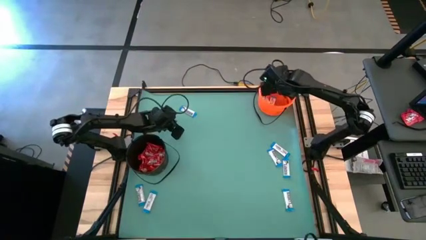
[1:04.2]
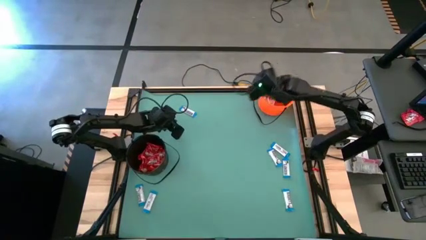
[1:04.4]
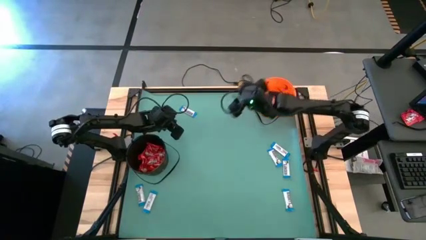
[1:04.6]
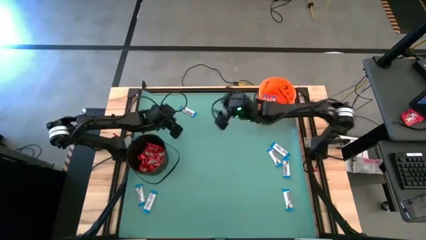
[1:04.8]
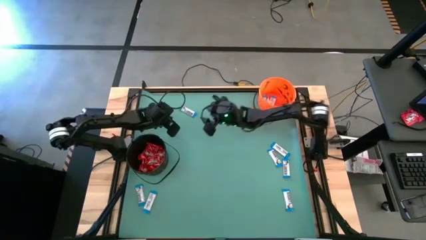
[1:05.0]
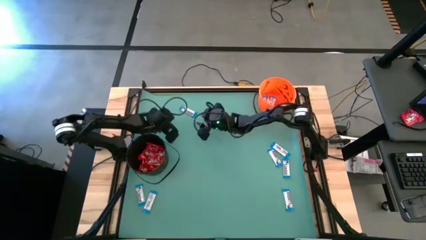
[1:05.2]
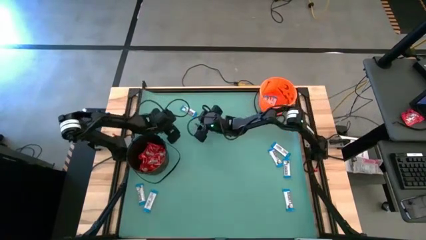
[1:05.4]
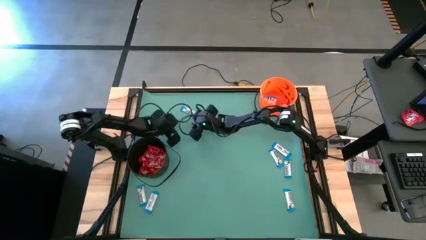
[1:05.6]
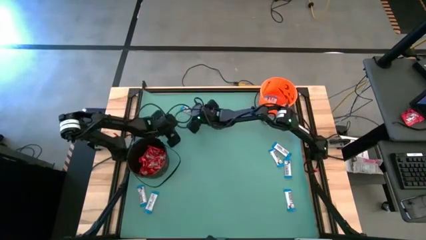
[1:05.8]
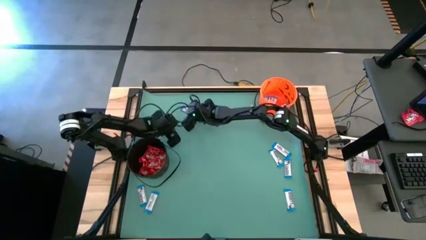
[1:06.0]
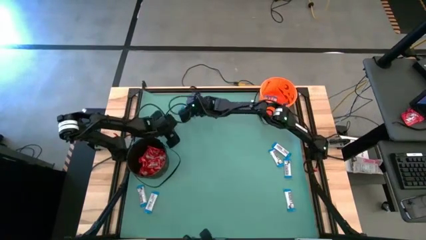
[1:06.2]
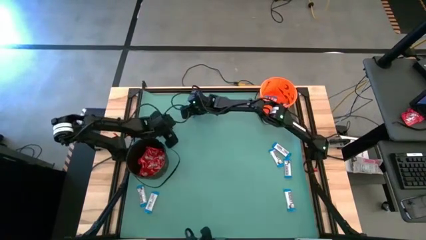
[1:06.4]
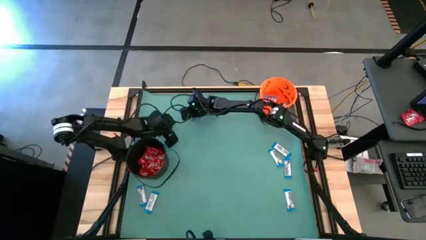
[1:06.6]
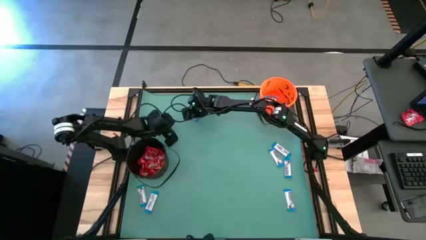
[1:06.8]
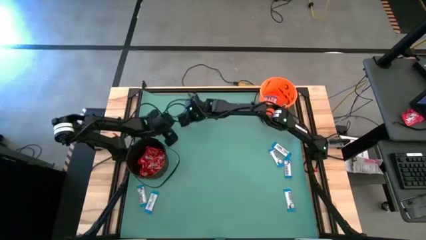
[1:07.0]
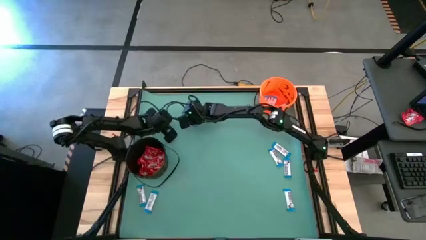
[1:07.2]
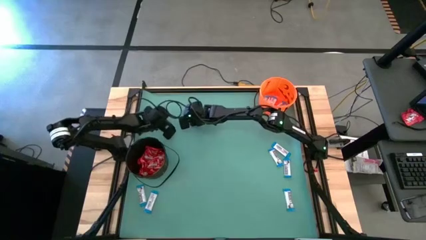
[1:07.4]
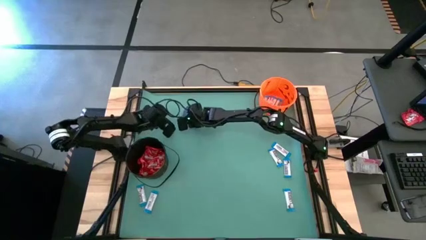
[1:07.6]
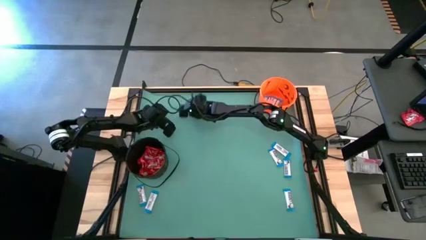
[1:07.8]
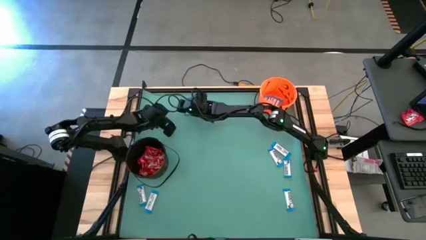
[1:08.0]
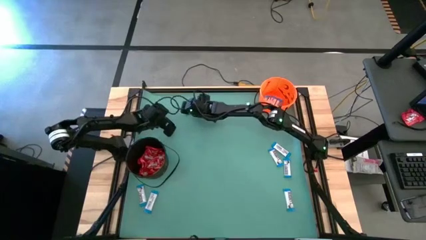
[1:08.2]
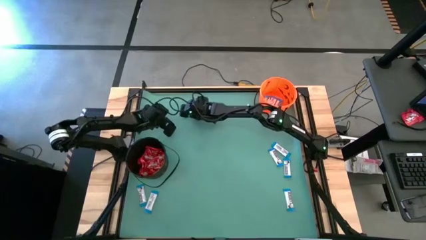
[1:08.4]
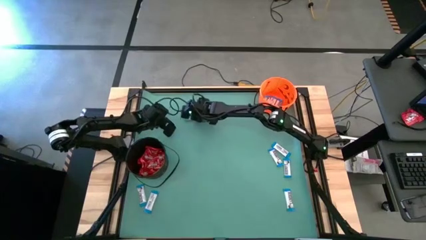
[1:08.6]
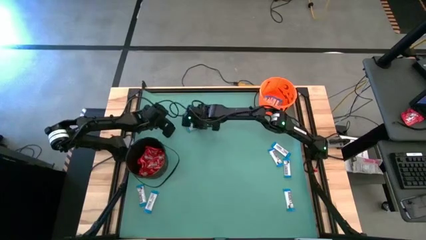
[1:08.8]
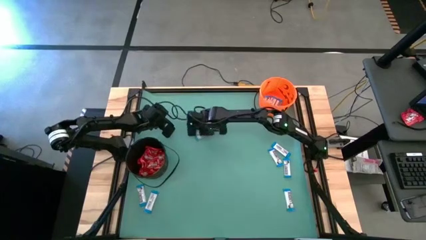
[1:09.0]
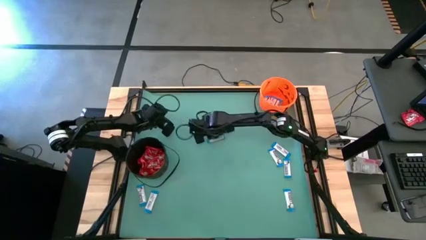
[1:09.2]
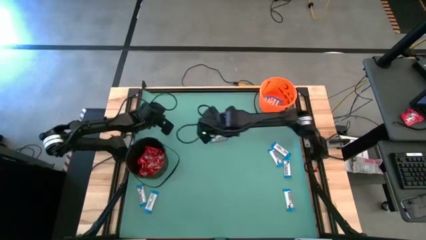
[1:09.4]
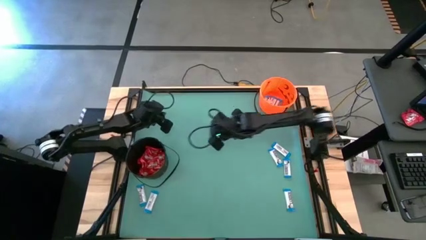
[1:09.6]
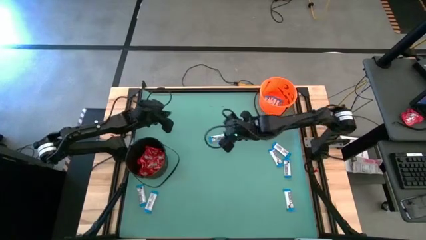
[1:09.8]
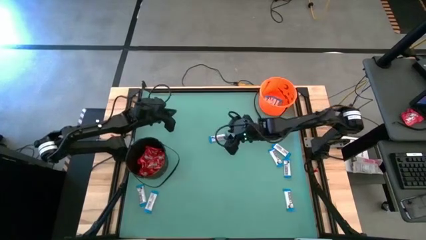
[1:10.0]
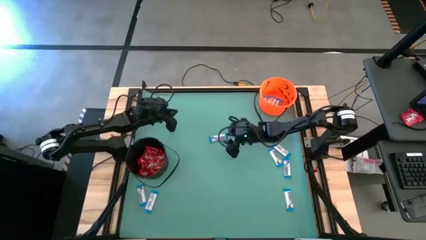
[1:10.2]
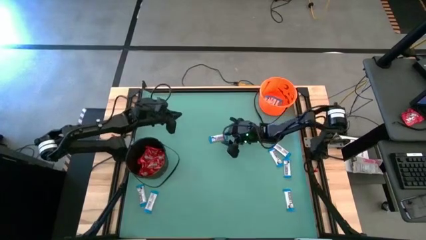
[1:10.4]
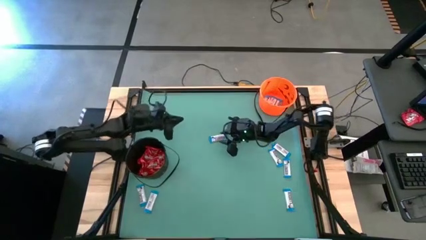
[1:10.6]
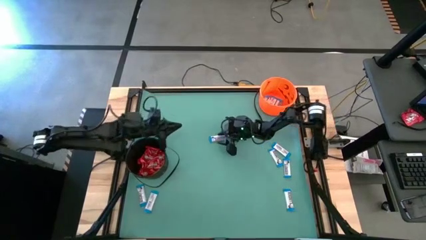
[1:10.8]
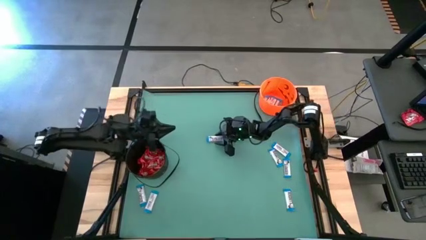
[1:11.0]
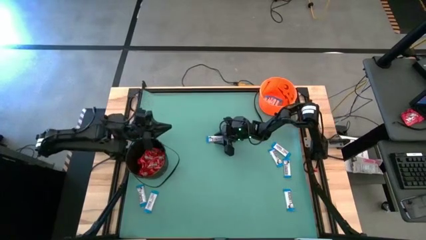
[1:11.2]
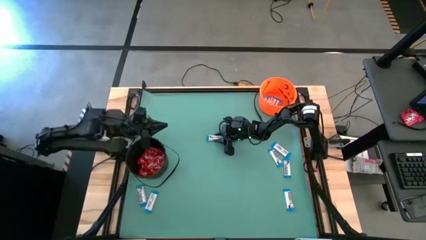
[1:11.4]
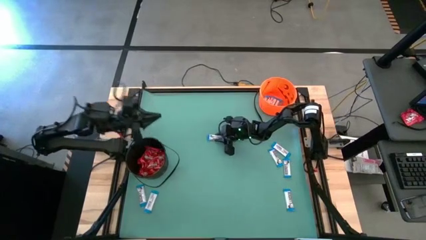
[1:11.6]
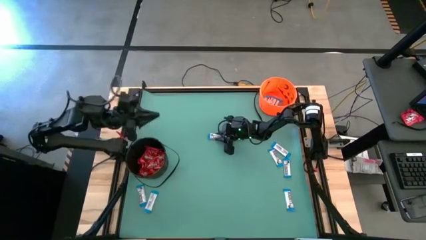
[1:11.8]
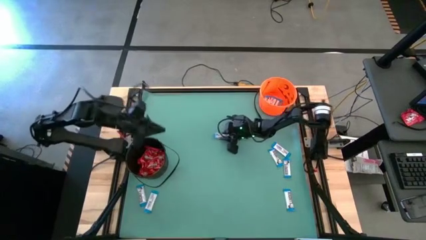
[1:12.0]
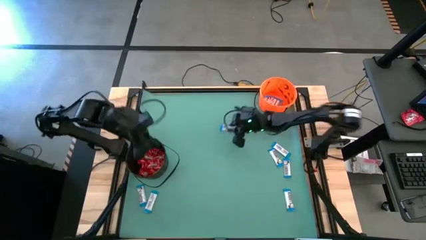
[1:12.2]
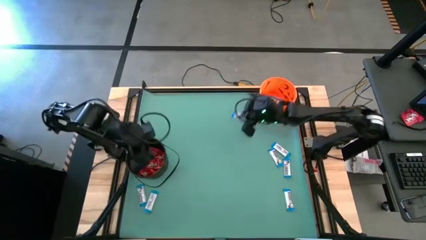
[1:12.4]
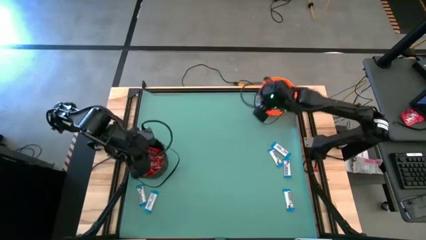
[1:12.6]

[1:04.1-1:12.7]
Task: Sort candy by brand, put in halloween buckets
Put the white chocolate into the orange bucket

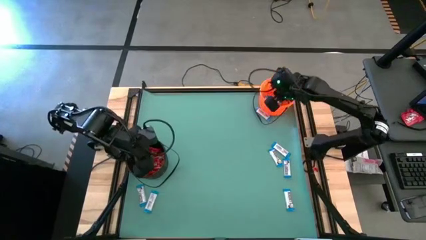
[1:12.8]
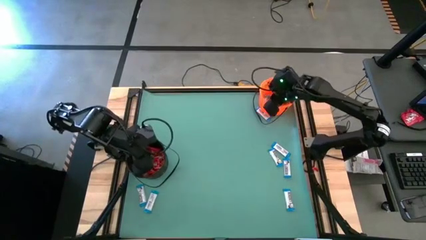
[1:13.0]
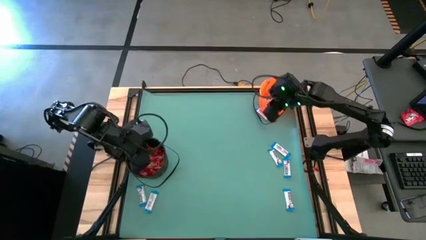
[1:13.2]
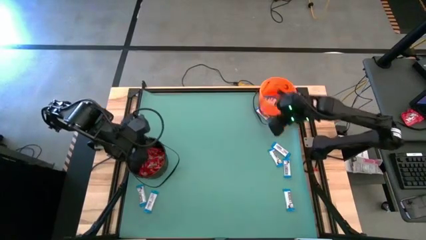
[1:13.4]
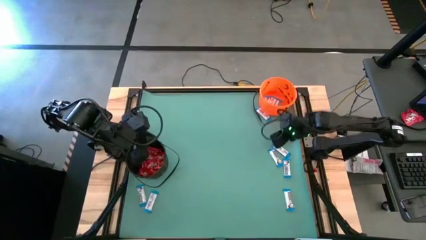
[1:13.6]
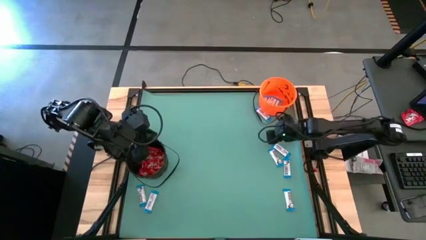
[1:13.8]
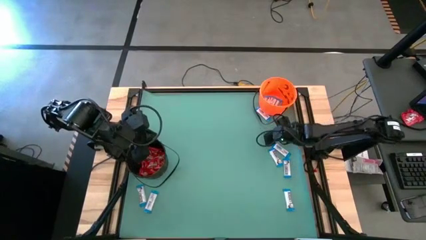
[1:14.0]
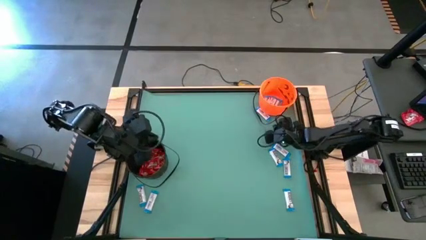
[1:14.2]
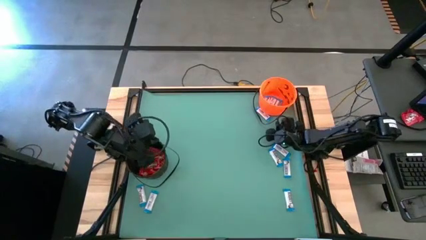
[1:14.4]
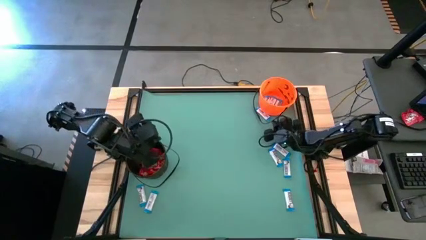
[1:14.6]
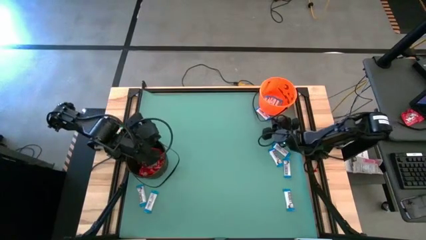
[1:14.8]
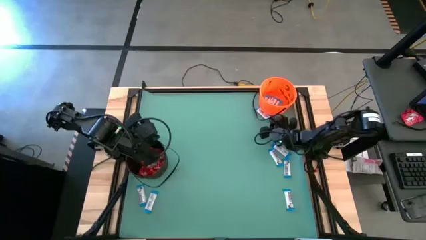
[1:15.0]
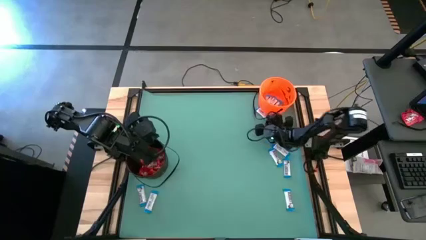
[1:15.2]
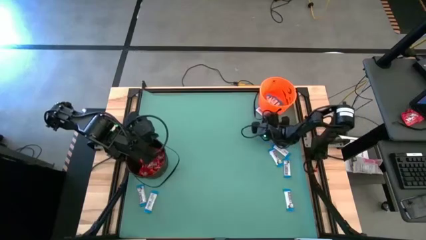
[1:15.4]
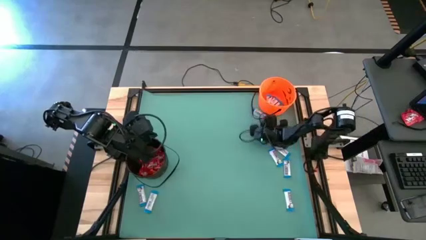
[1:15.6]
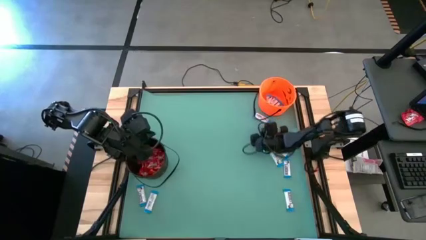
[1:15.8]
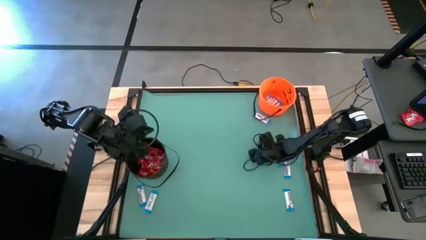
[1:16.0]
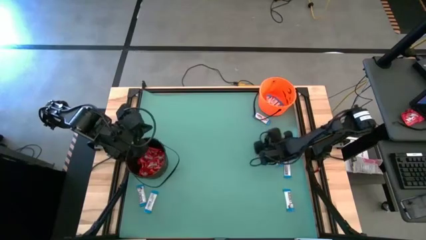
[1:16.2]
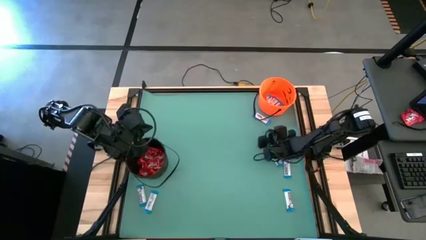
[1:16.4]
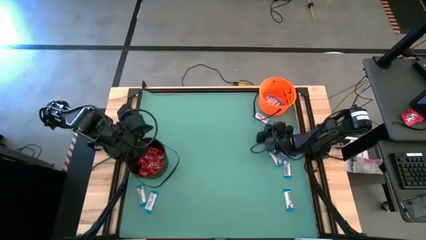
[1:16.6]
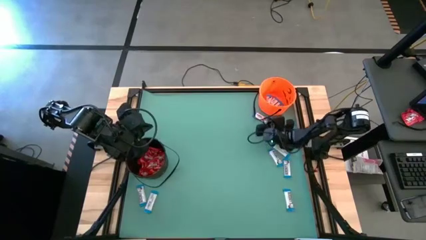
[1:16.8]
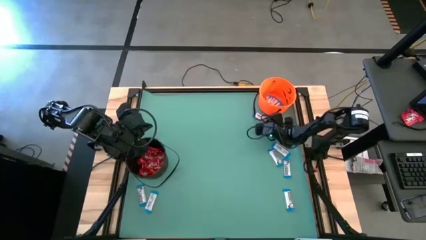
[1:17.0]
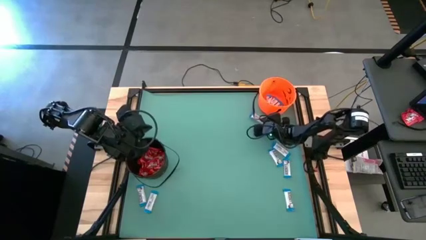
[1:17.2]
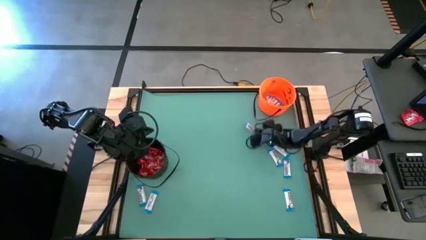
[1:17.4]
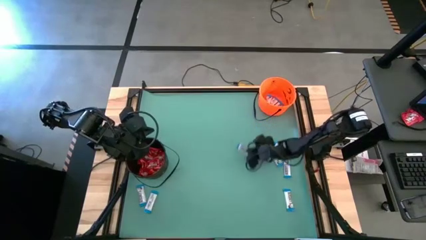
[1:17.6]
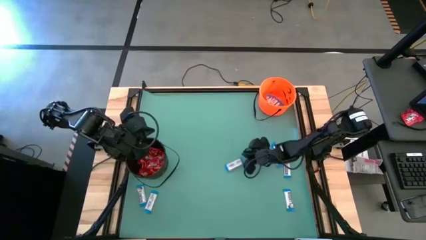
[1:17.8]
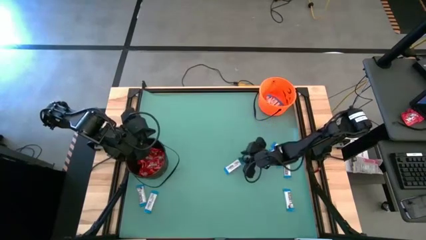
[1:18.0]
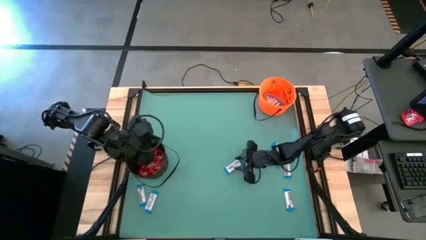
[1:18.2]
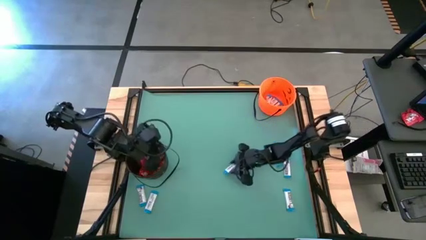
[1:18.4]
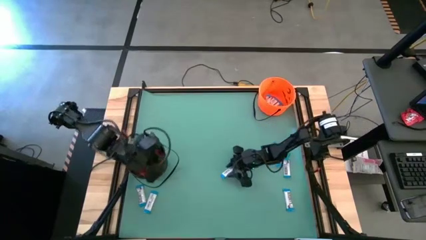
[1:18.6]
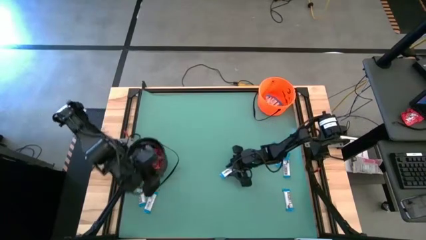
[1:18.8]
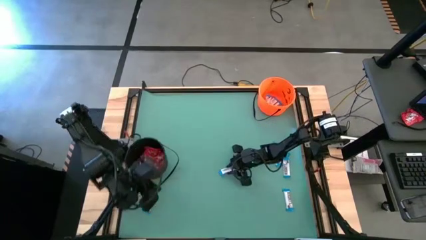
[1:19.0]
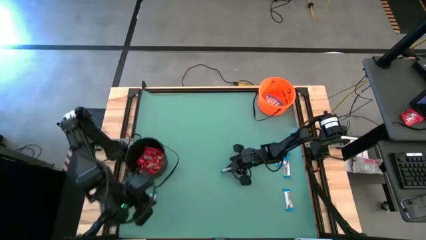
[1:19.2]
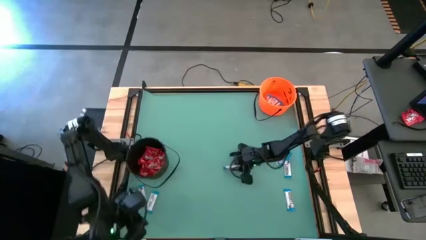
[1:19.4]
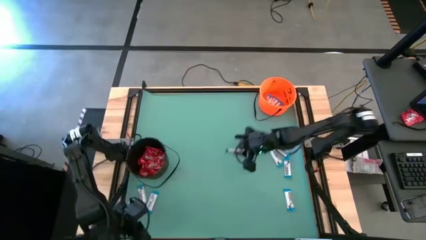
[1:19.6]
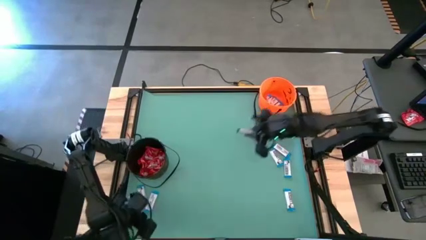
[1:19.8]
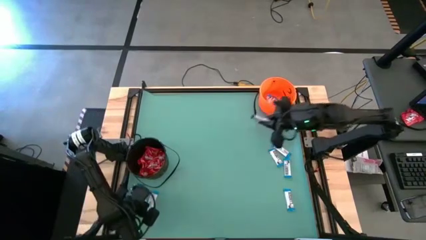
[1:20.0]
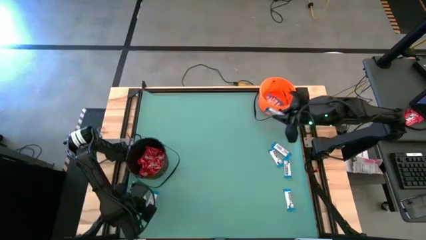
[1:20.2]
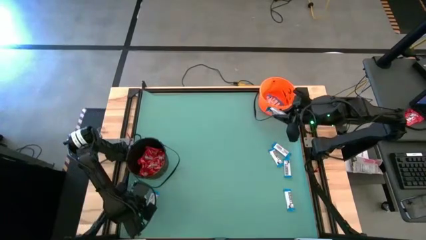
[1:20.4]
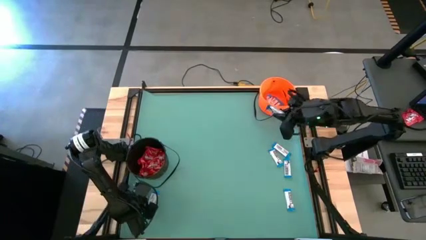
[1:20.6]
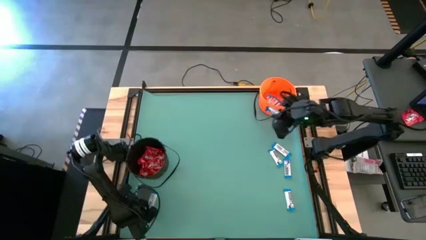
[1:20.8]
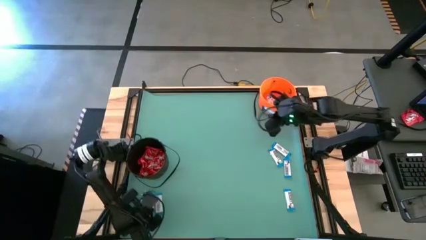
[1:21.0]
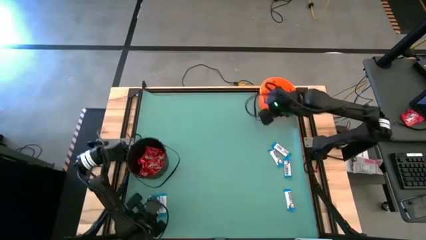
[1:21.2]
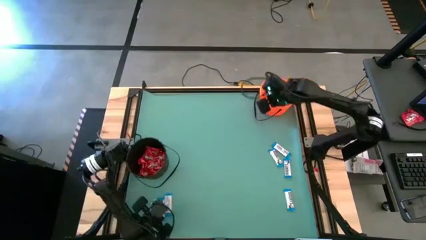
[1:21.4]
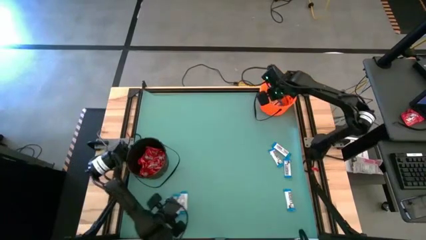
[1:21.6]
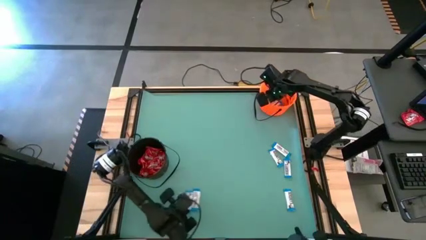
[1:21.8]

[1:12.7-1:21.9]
Put the white chocolate into the orange bucket
